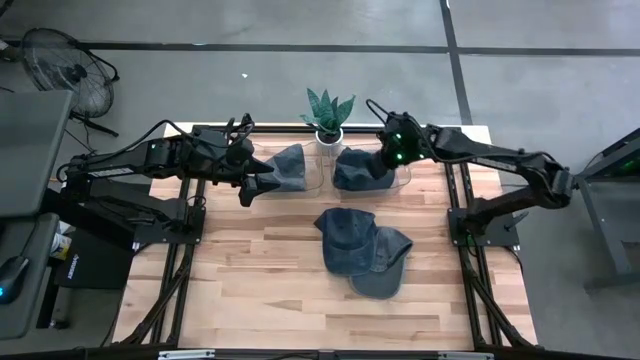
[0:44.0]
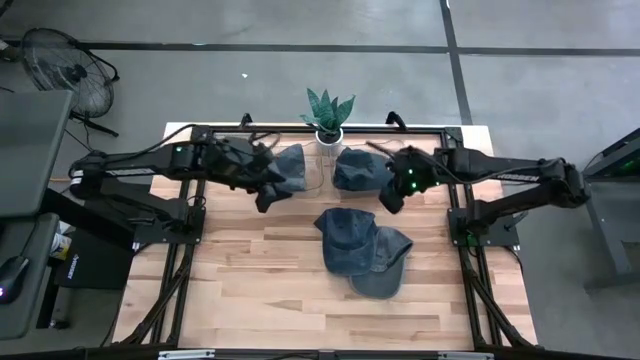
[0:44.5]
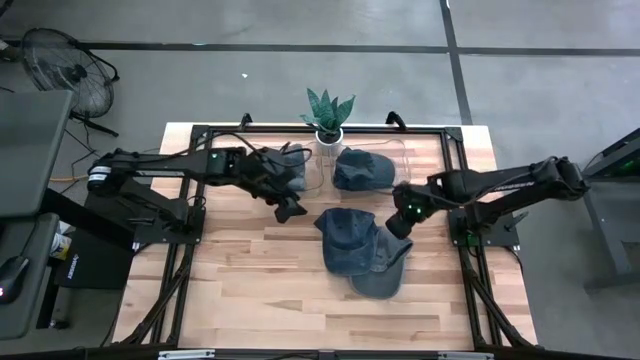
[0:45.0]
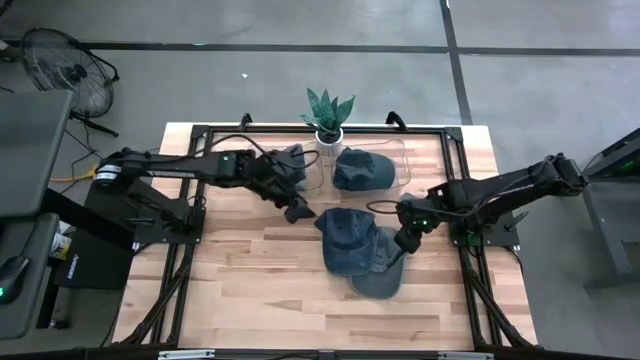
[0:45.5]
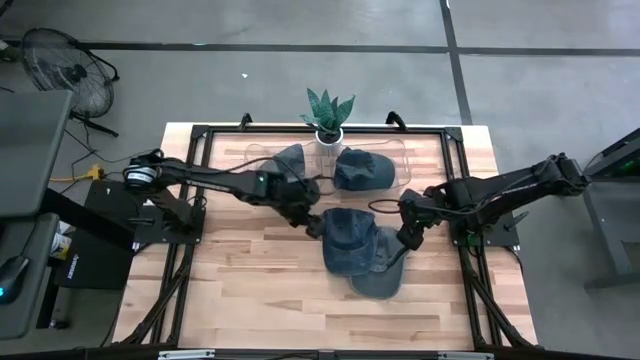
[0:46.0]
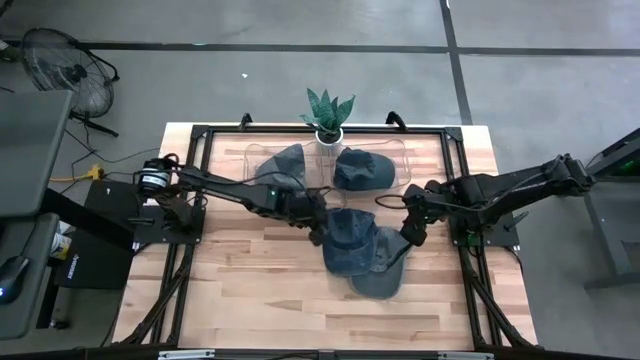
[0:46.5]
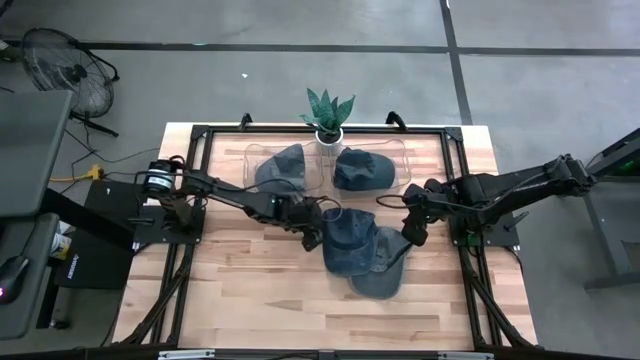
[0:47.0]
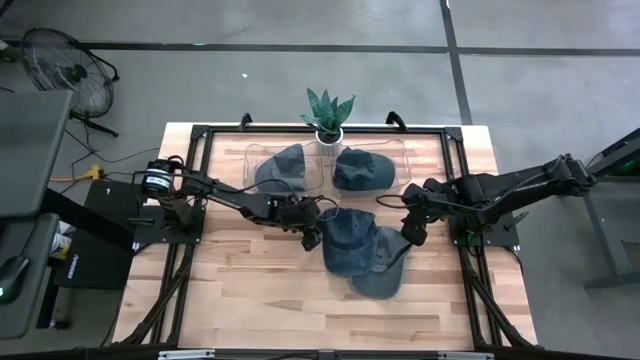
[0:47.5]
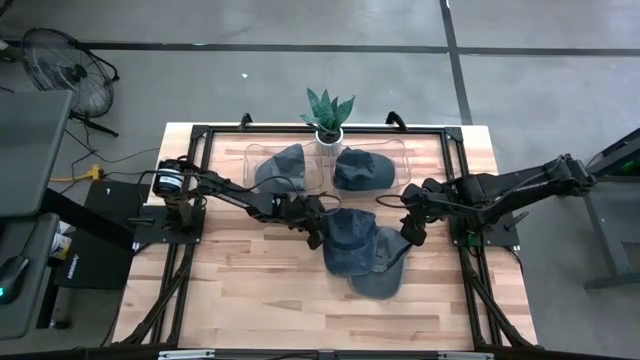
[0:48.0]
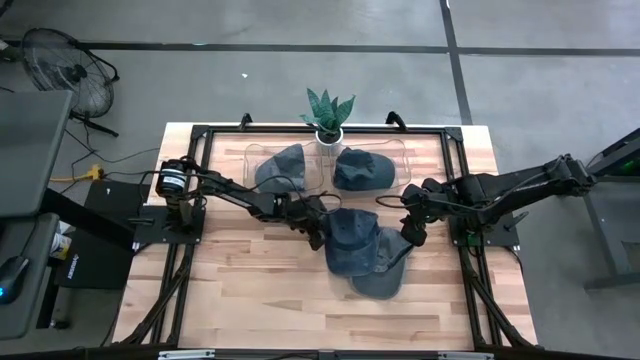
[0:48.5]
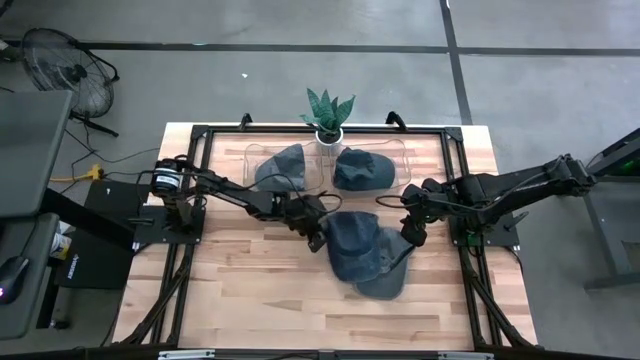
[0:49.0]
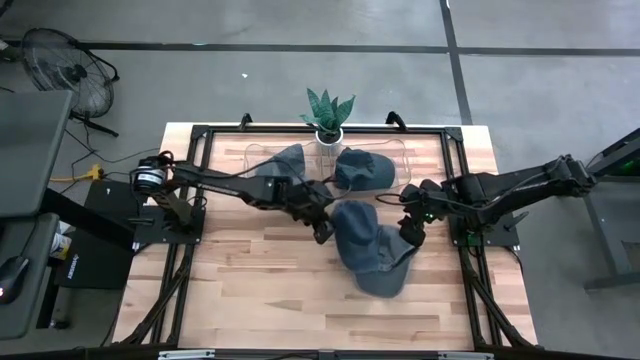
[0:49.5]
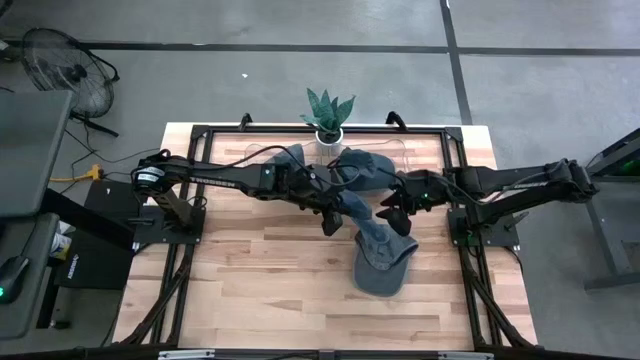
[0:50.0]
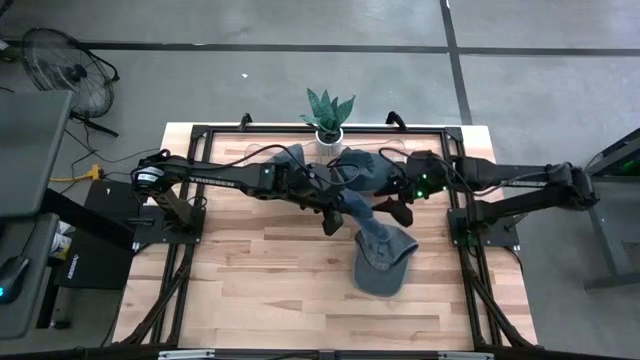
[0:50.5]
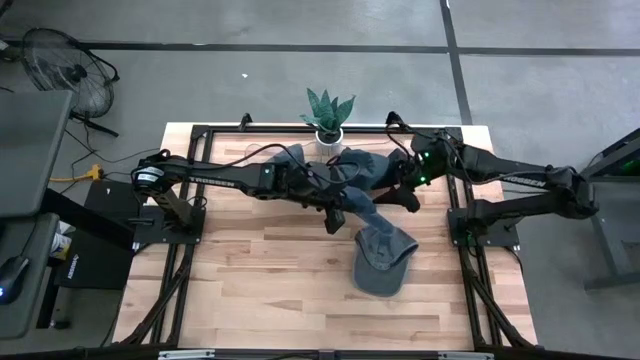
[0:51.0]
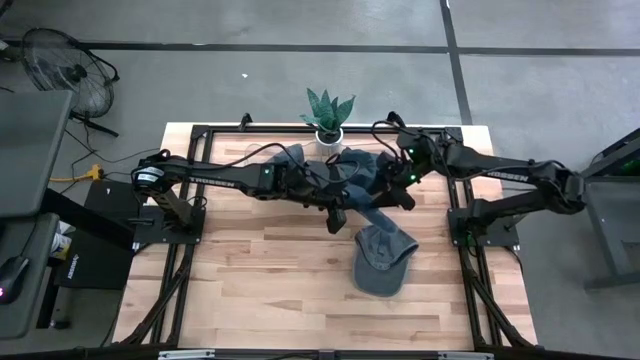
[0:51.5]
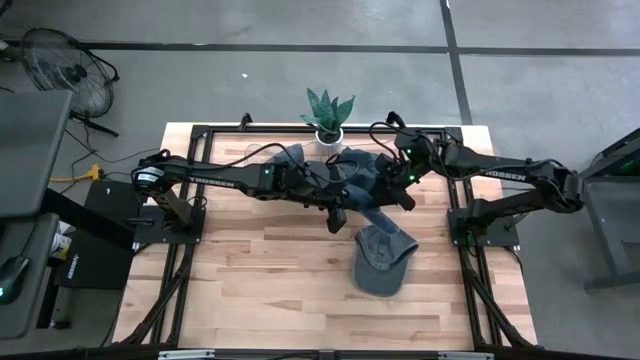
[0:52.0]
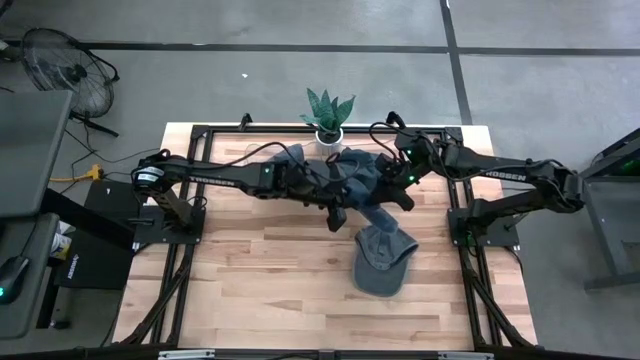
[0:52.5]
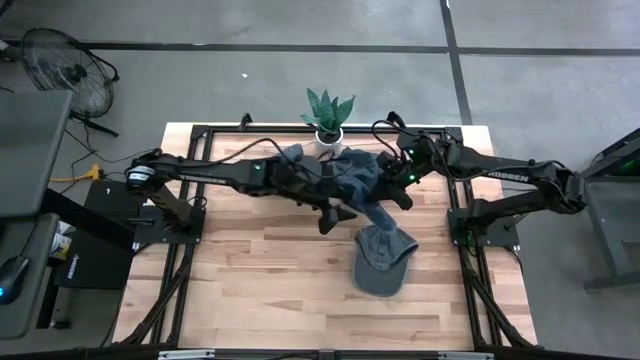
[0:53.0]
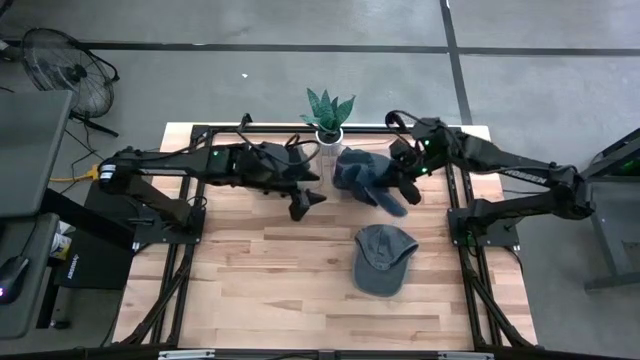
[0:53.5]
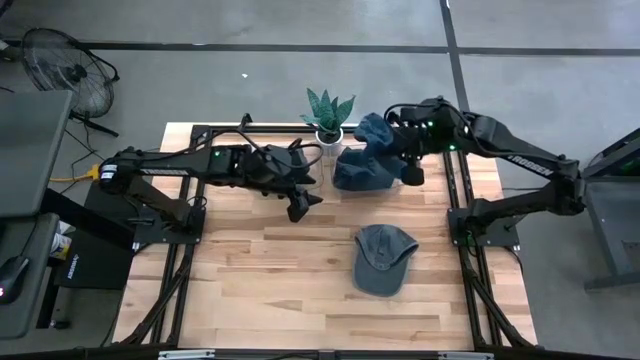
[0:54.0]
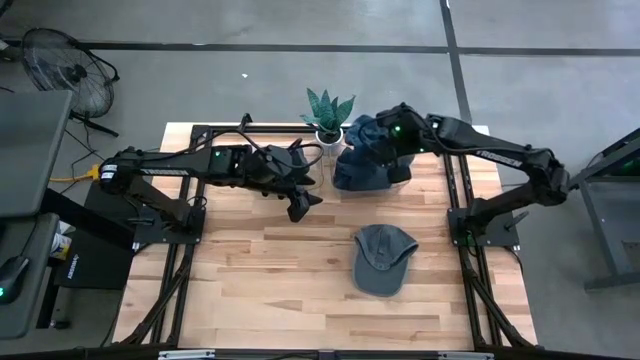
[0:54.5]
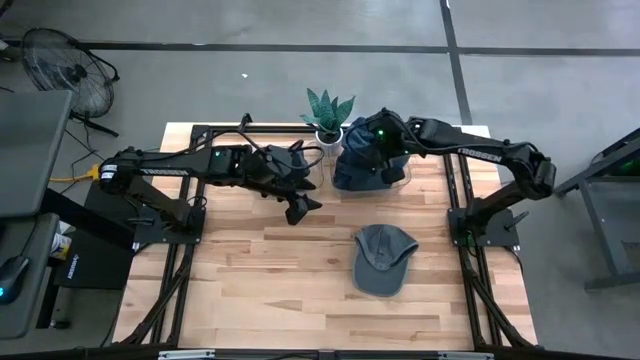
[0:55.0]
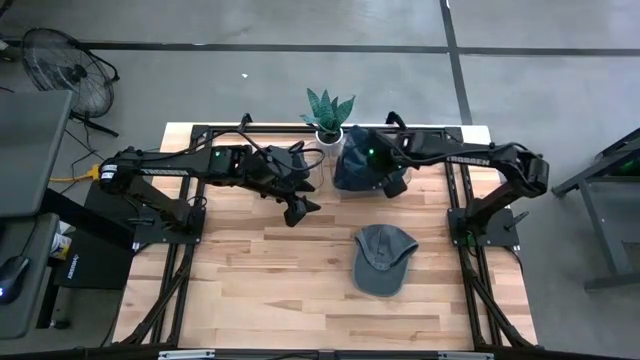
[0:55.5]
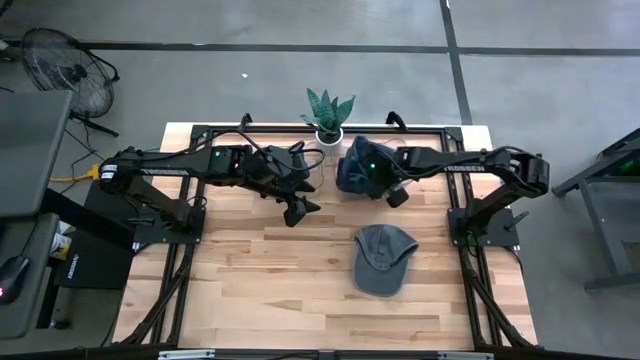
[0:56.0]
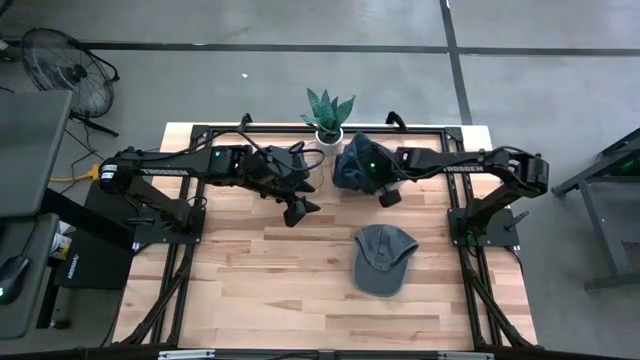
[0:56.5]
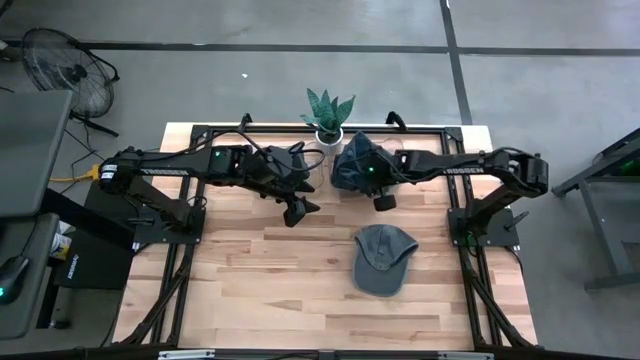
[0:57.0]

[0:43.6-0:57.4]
Task: Pick & Place hat
Put the dark blue cap into the right transparent bin

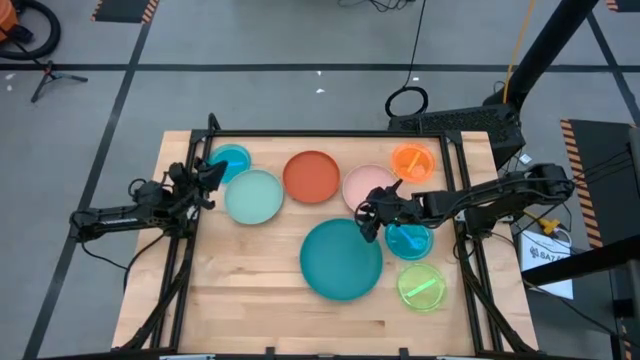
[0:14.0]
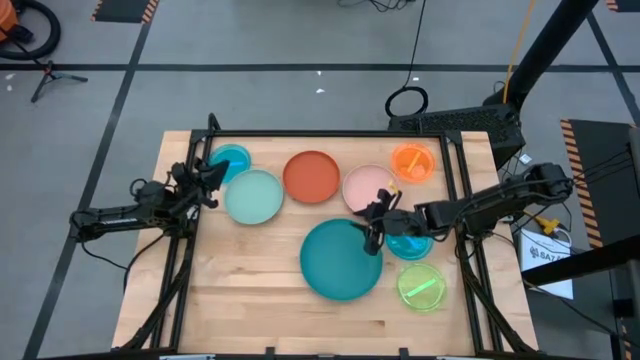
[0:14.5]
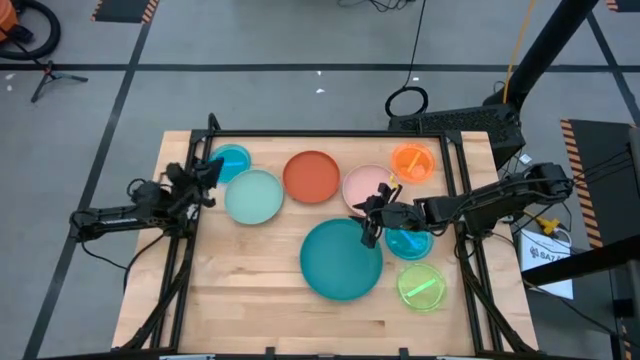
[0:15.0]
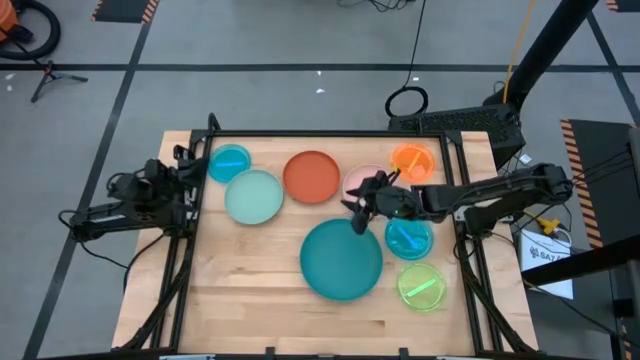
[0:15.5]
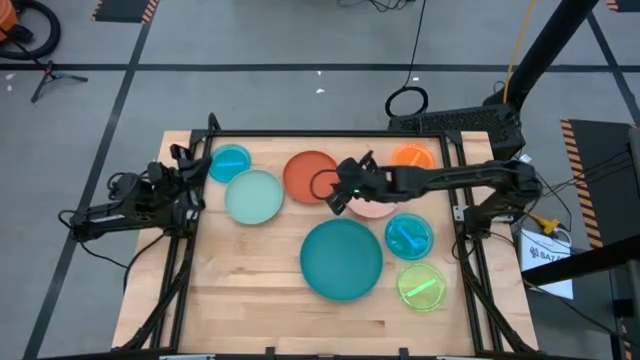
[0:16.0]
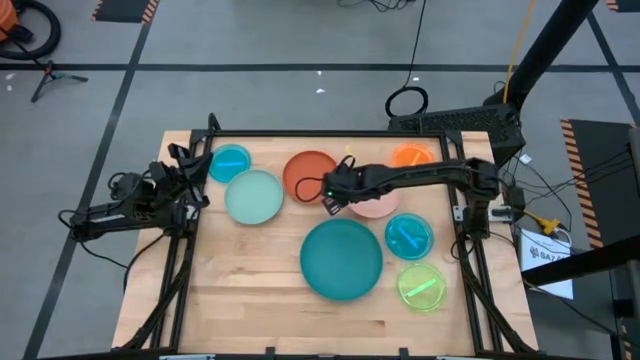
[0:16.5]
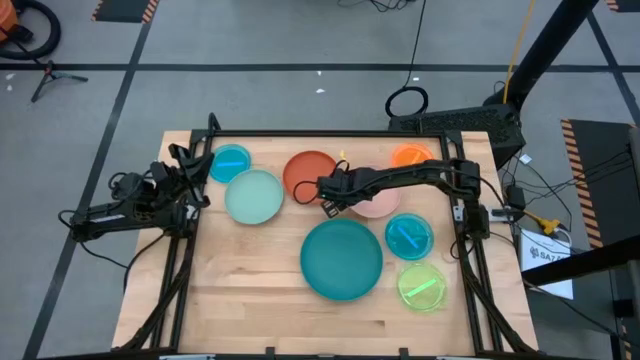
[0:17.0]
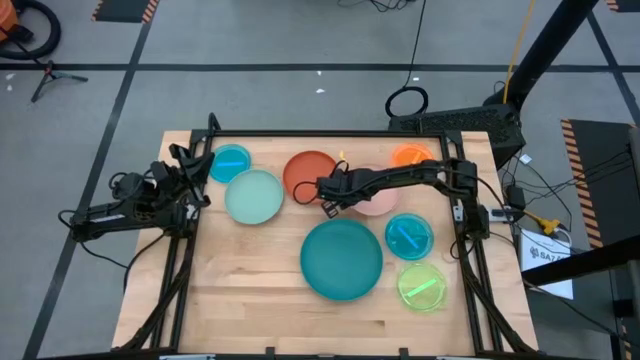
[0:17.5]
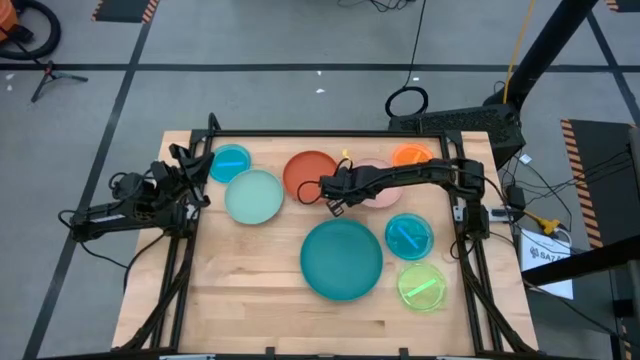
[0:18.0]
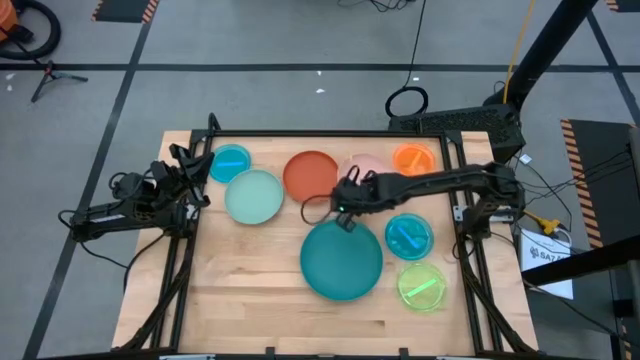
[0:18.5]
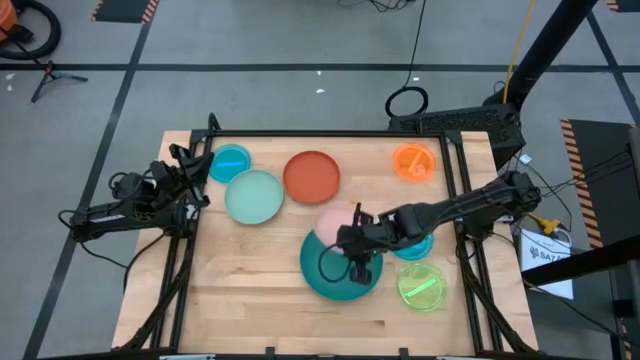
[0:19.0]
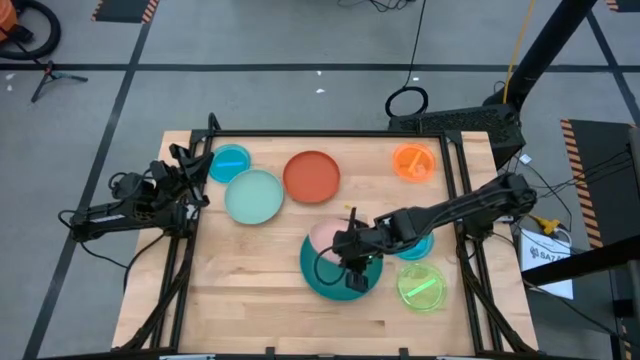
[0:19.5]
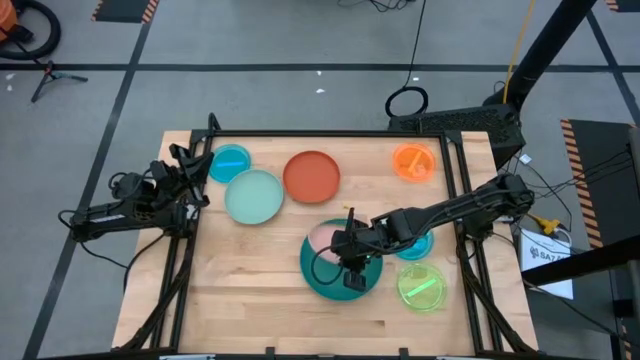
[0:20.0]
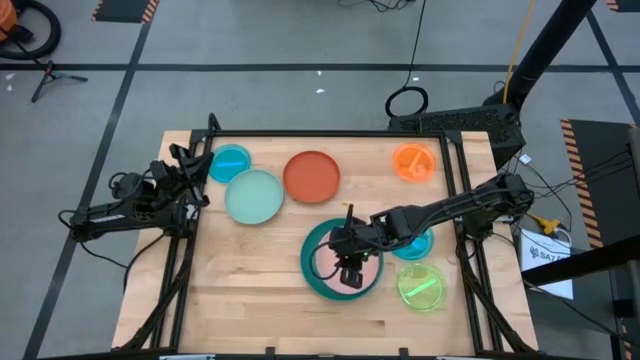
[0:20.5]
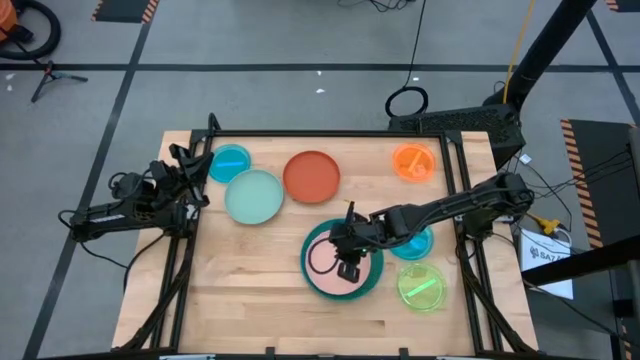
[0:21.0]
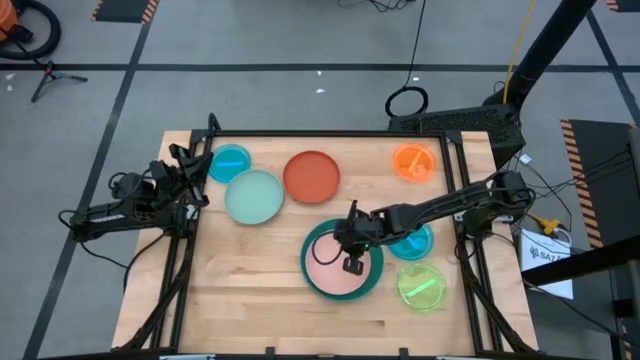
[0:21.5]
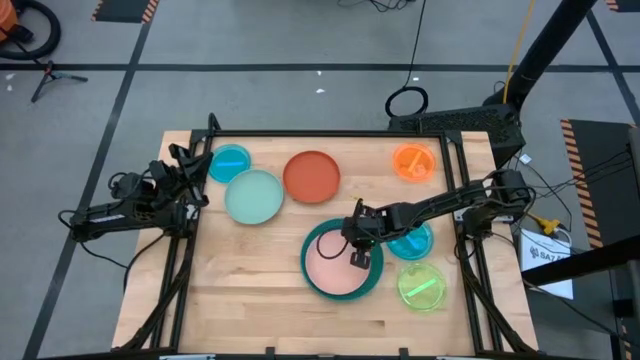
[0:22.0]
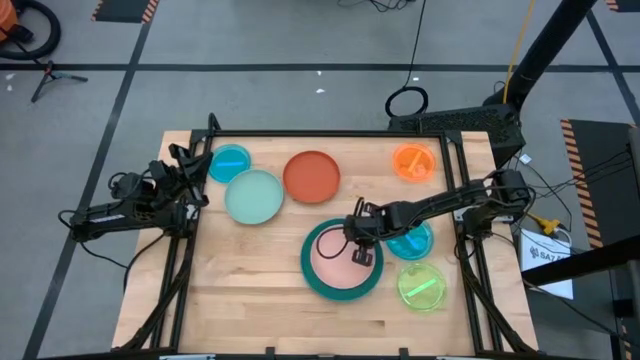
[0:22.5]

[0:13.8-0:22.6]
Task: Stack plastic plates
Stack the light pink plate on the blue plate
